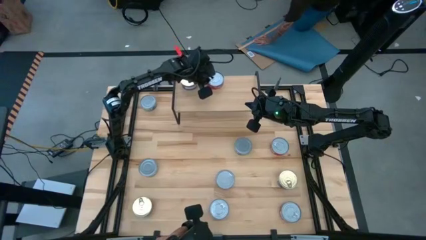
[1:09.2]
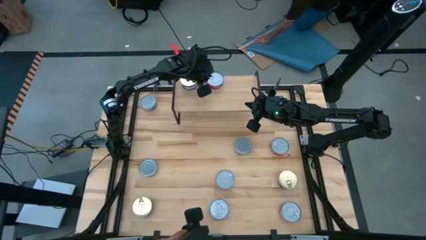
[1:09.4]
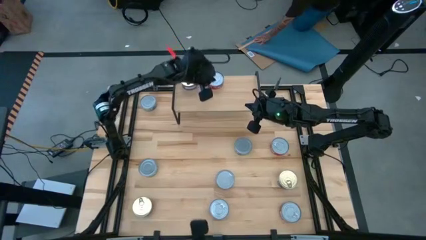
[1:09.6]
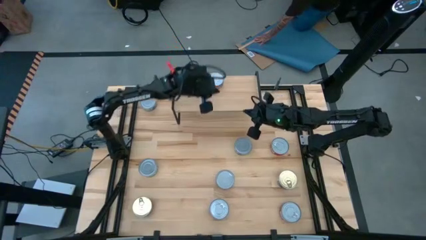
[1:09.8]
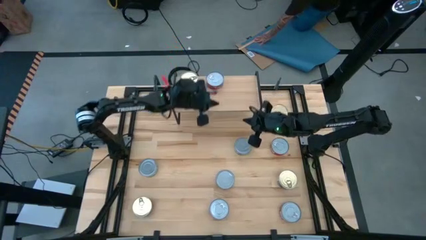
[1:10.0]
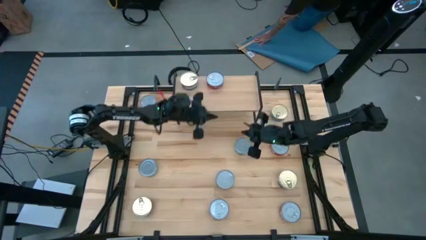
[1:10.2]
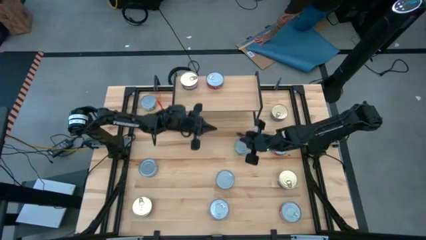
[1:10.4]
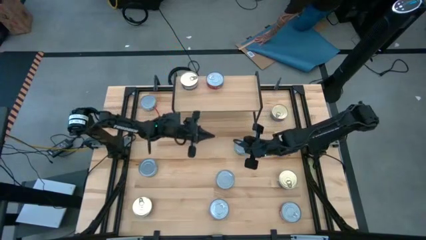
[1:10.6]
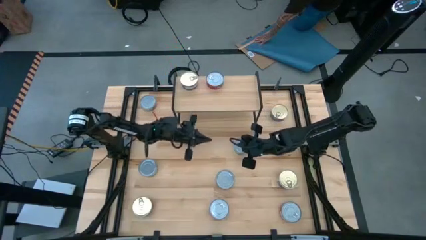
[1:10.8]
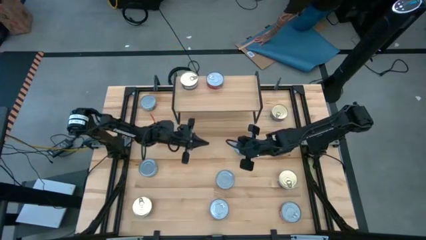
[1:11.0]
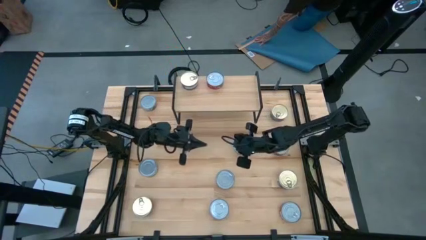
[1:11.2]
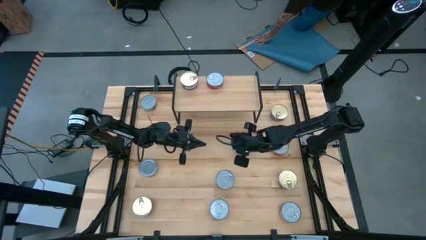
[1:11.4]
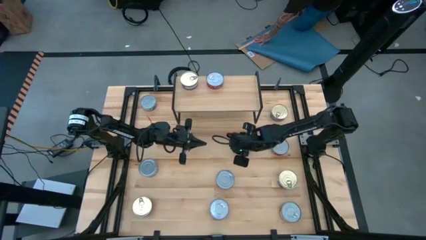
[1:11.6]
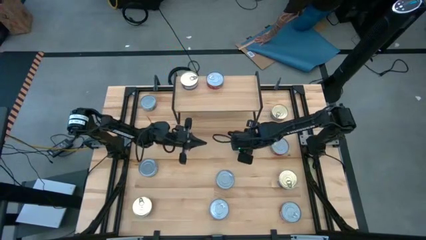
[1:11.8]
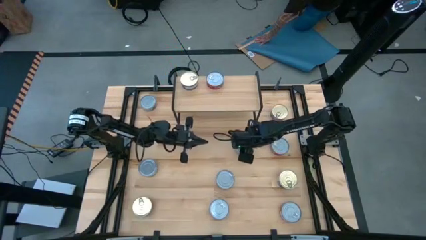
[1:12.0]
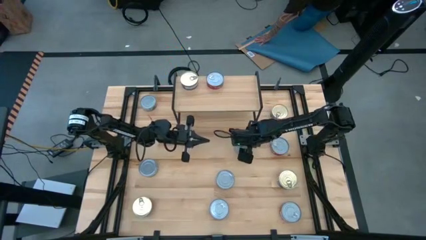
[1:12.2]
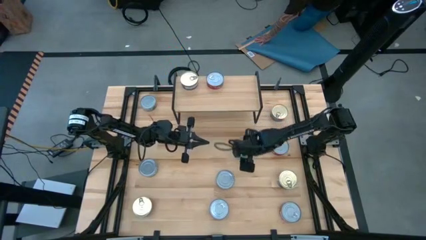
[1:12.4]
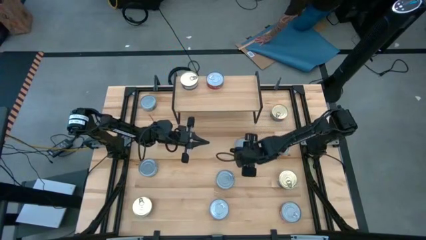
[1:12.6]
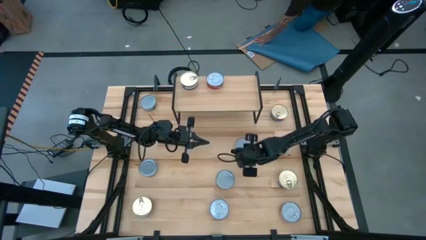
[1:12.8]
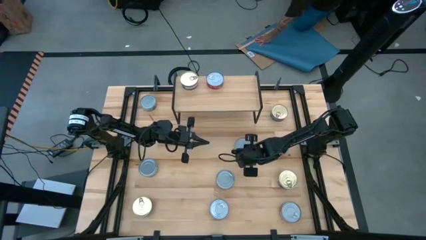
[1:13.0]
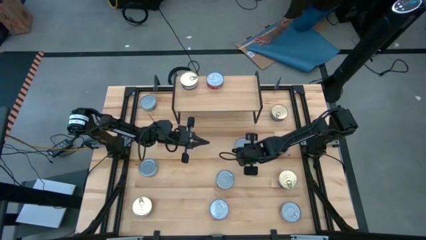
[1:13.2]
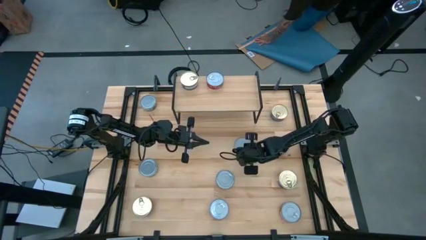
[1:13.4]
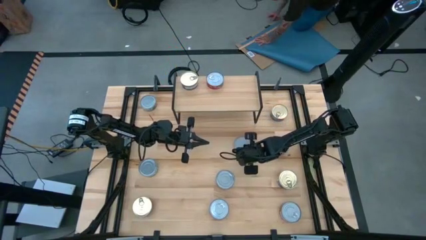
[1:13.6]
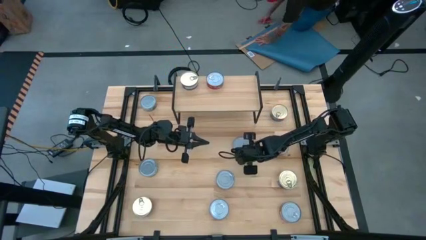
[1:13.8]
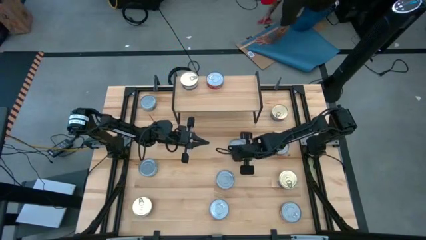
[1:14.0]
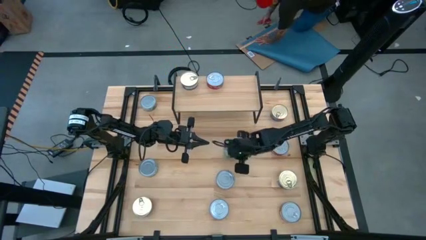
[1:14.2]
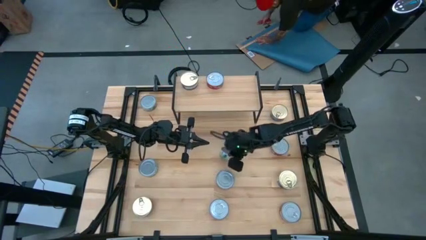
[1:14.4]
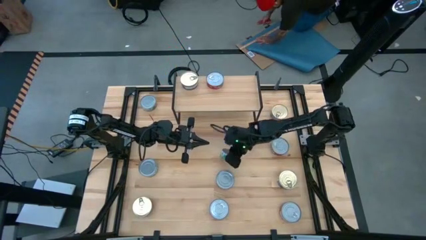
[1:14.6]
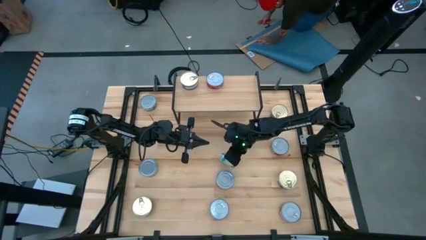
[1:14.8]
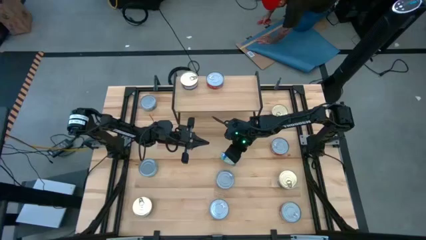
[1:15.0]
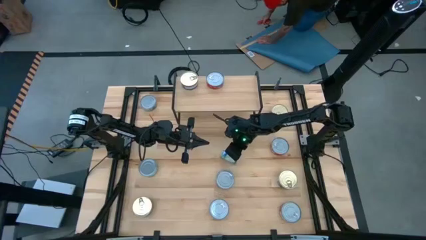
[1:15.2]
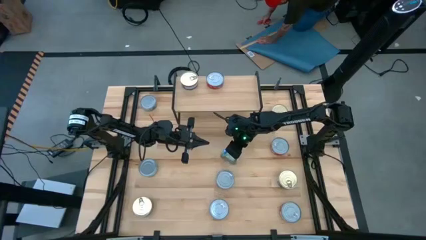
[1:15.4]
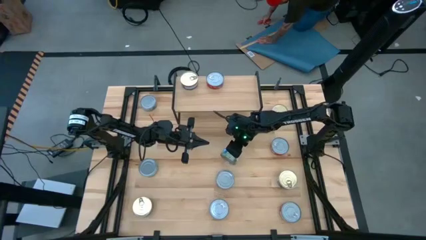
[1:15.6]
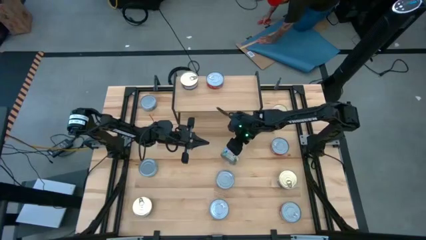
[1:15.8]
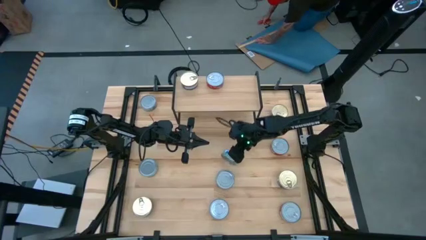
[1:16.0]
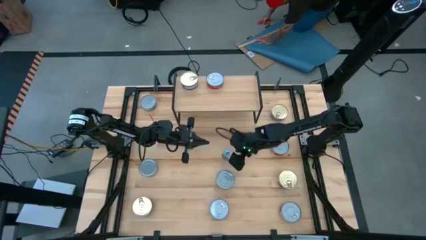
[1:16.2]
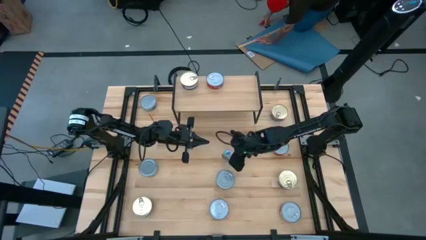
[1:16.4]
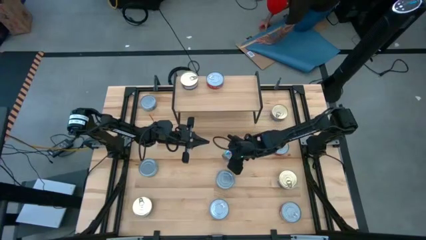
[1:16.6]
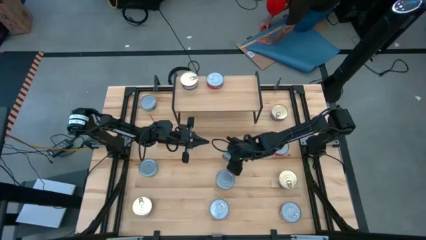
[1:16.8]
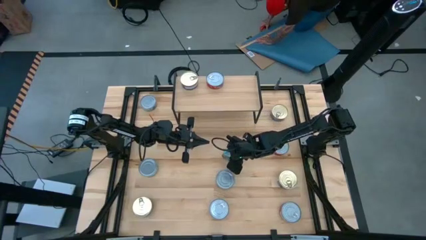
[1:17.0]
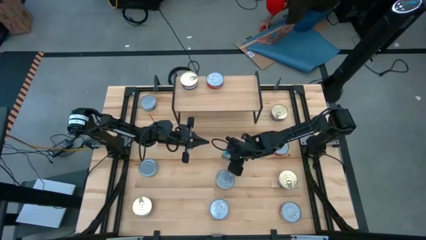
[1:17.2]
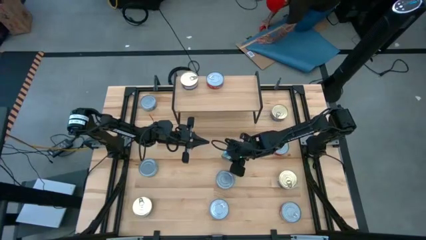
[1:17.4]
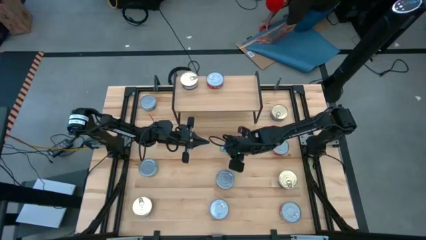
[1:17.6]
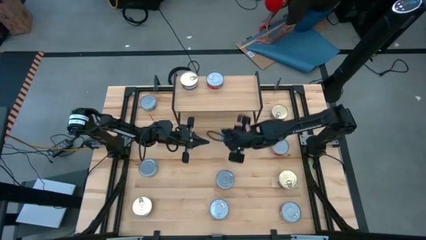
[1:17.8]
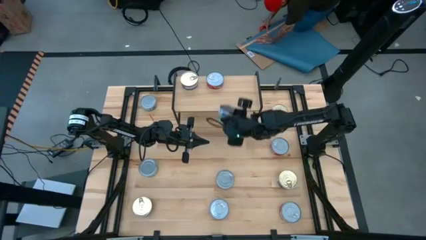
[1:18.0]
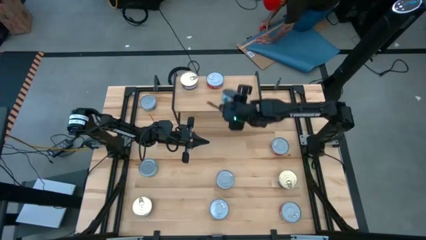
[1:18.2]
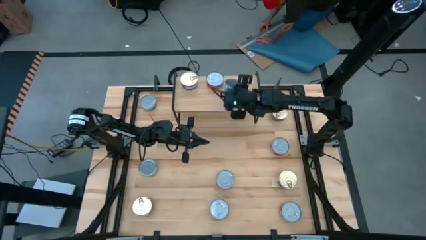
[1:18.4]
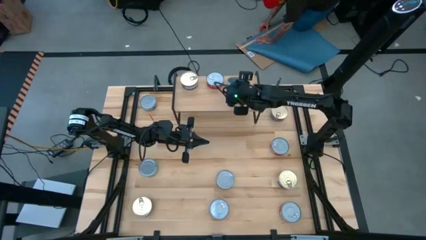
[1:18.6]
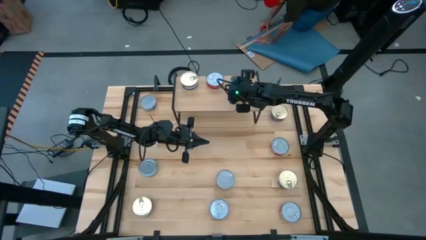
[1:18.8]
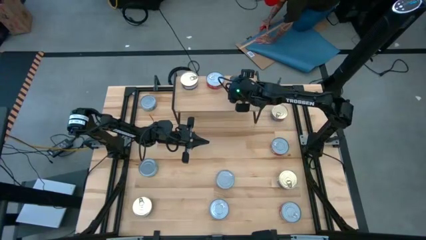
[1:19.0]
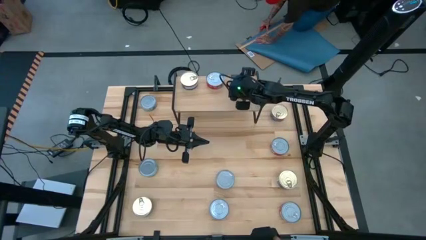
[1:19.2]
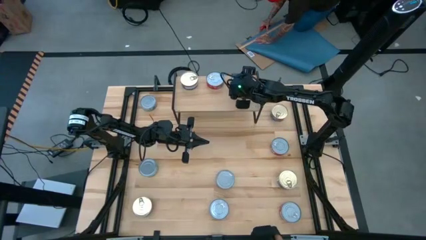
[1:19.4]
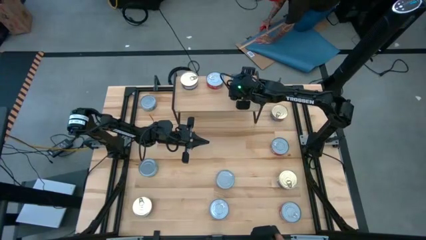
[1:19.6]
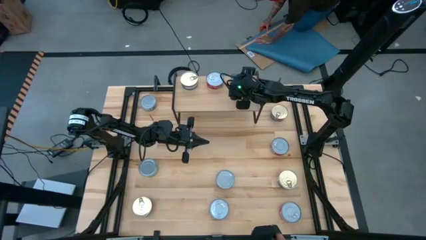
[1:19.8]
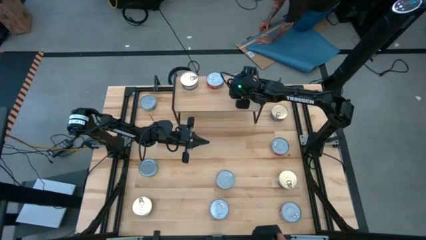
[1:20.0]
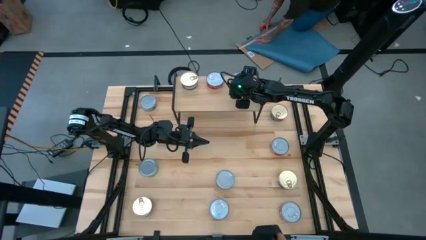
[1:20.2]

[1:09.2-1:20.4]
Task: Stack canned seafood by type on shelf
Put the green tuna can on the shelf

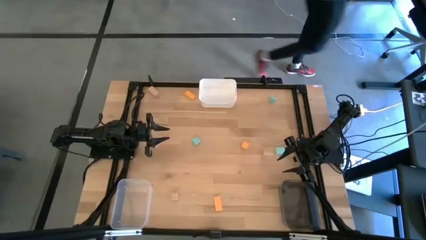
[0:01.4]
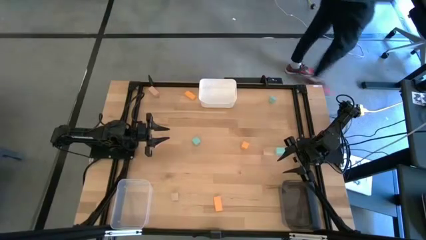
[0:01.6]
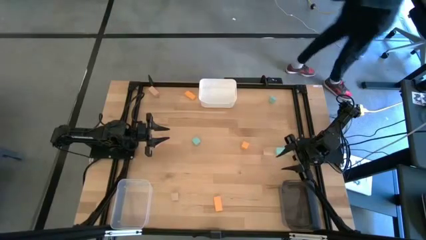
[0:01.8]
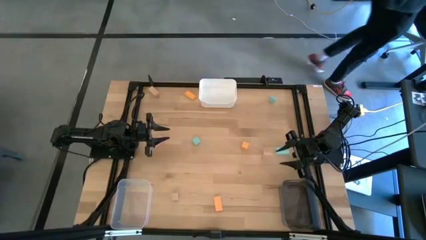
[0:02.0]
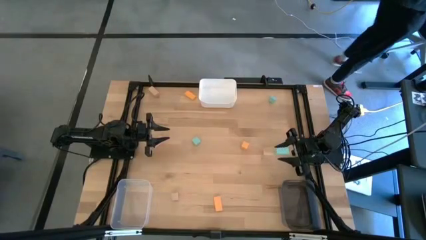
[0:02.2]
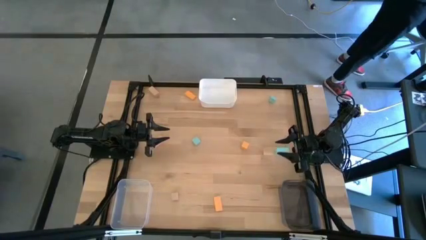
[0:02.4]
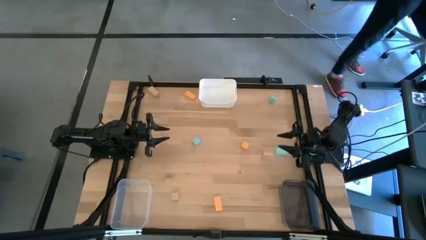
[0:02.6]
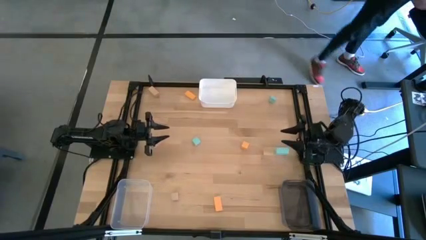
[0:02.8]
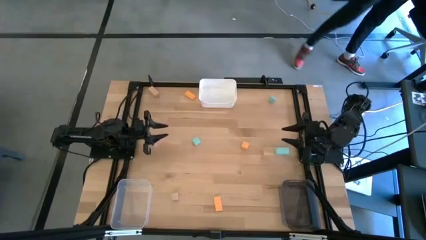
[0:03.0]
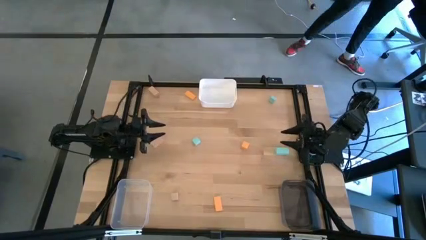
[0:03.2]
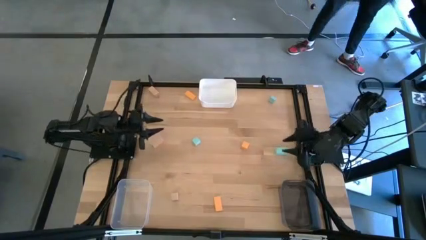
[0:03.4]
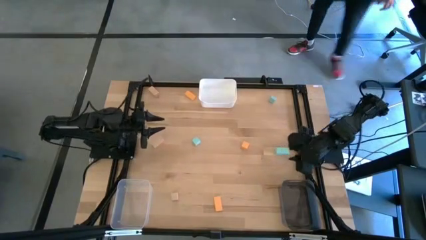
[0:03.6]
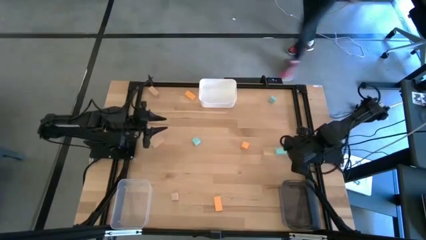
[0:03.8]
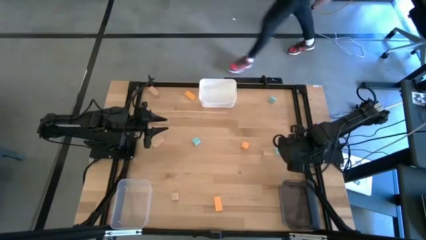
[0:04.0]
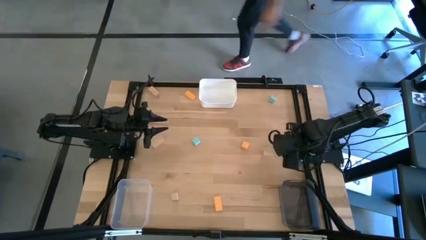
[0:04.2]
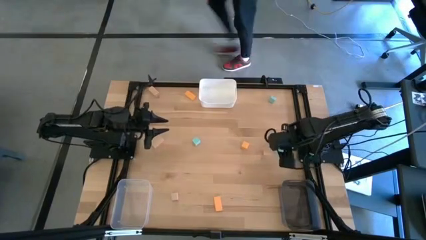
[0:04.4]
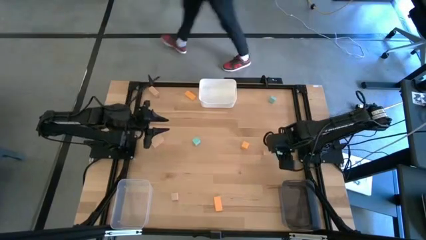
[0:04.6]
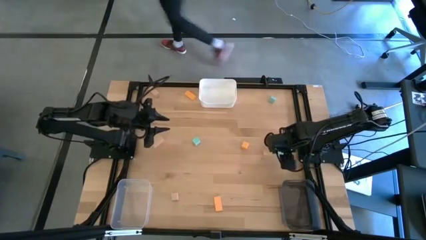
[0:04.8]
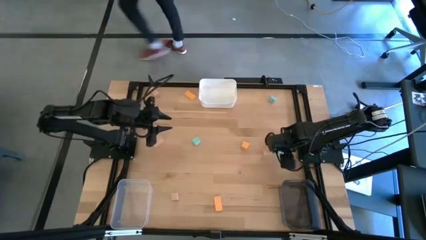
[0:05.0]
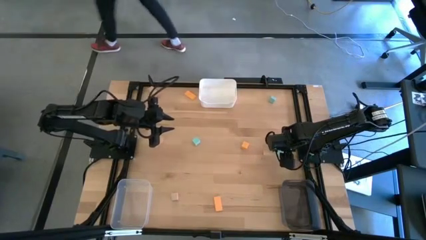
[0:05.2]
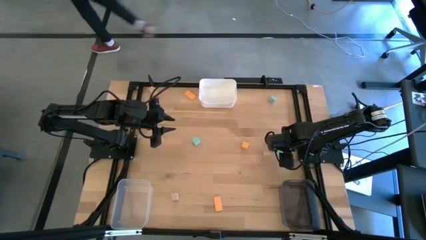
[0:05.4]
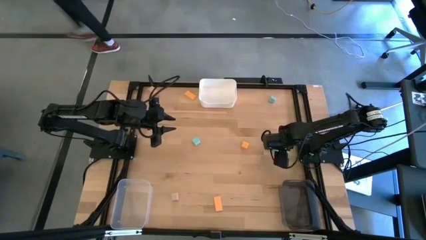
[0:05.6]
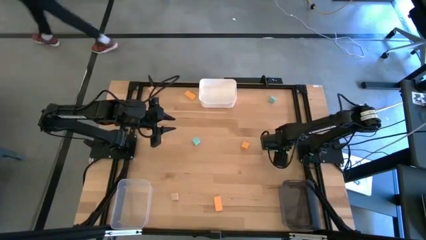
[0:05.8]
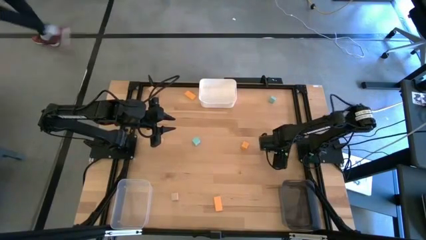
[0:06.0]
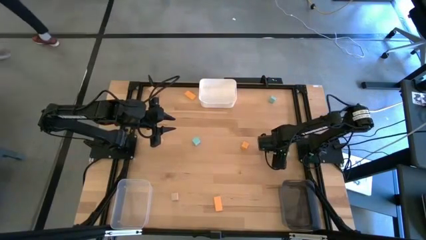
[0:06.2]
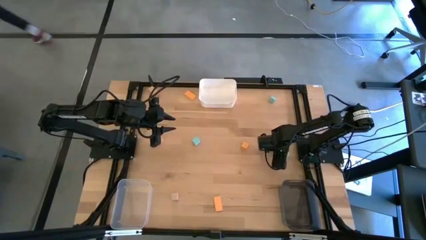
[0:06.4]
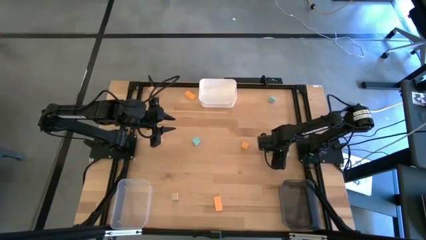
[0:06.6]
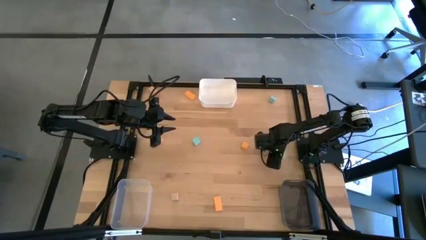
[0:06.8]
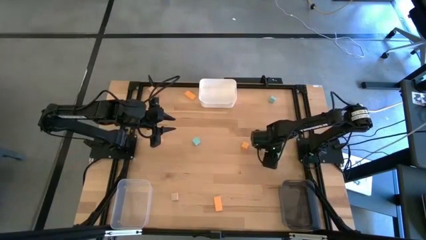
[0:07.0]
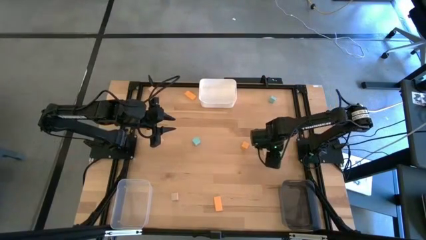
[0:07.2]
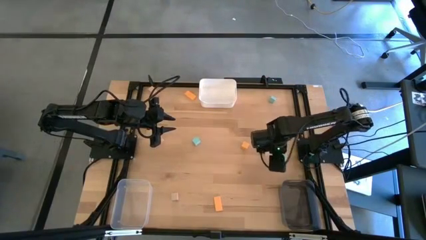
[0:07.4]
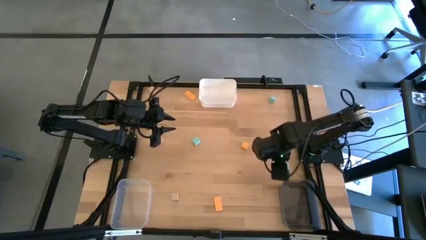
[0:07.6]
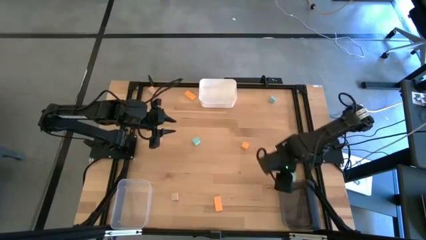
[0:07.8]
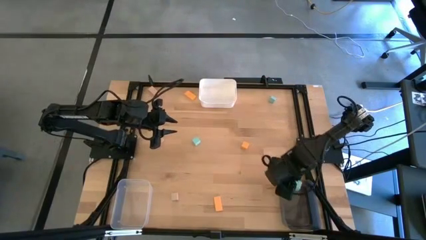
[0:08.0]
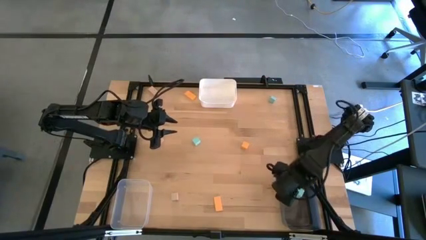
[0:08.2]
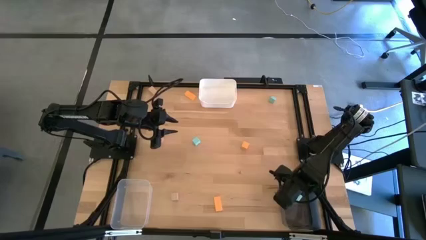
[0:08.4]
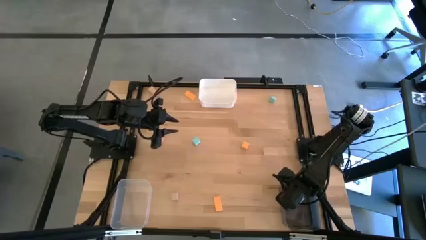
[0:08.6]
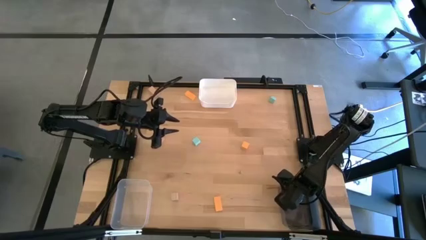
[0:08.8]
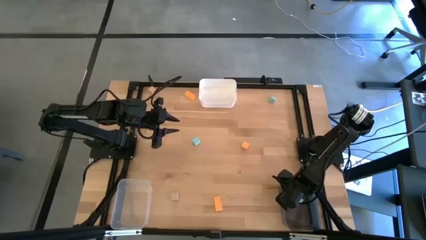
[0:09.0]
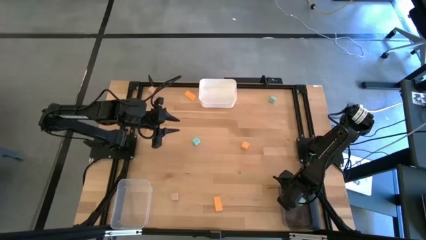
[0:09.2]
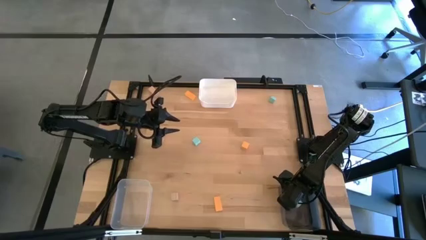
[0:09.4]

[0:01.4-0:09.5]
Task: Sort & place blocks by color
Put the middle right light blue block into the black bin
